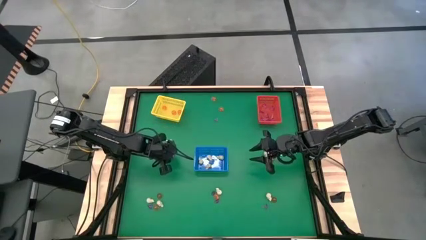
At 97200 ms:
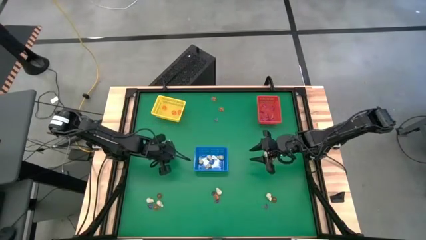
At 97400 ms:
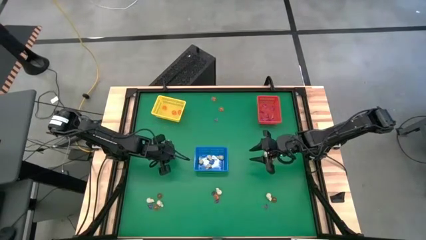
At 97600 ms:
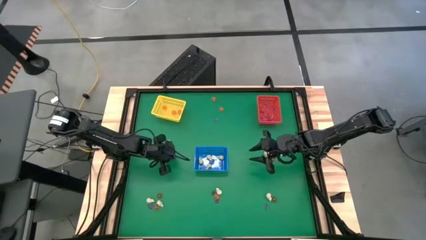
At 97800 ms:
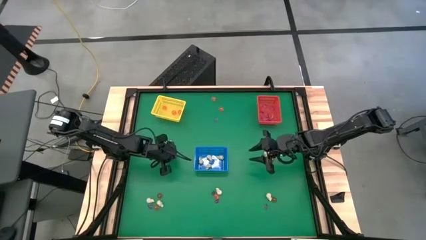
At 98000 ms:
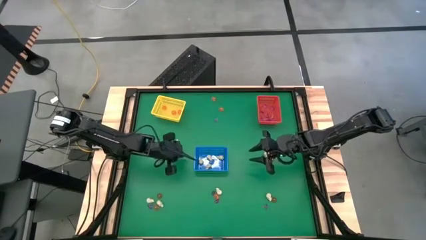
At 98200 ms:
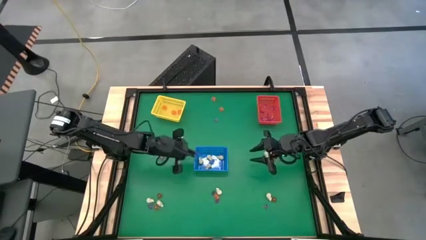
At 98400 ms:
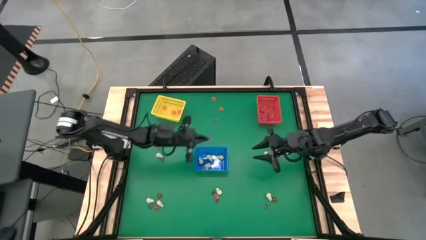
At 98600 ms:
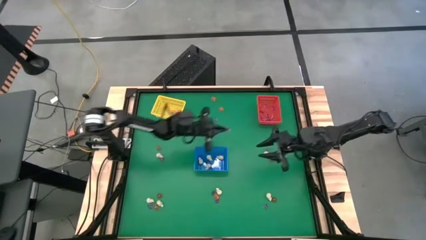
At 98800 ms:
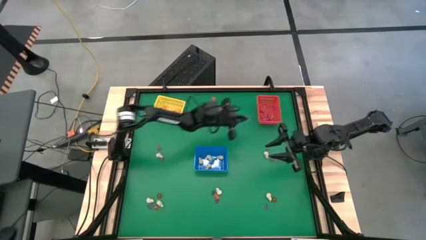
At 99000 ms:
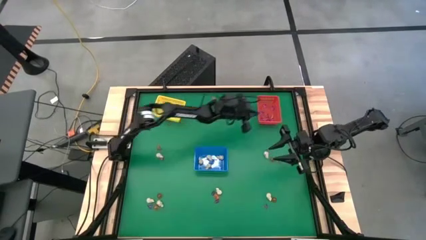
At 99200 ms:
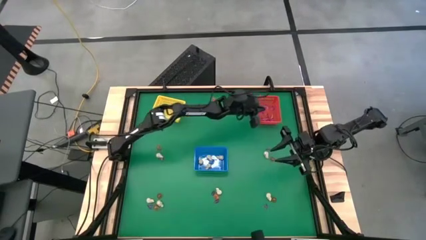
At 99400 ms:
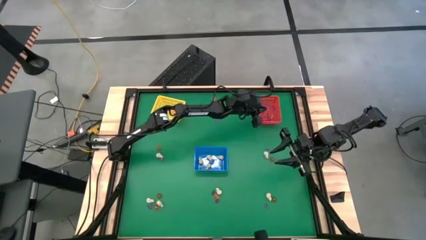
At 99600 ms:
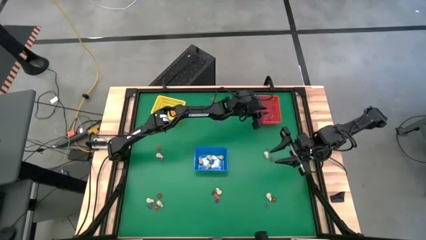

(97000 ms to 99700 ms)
Task: Sort Halloween decoration
Put the purple witch hat toy into the red bin

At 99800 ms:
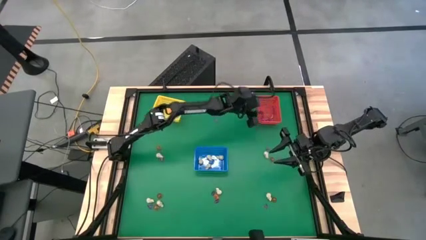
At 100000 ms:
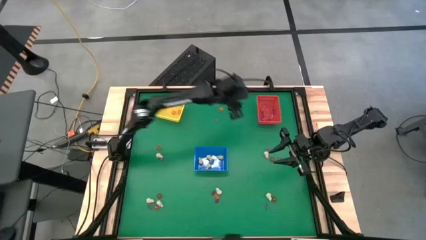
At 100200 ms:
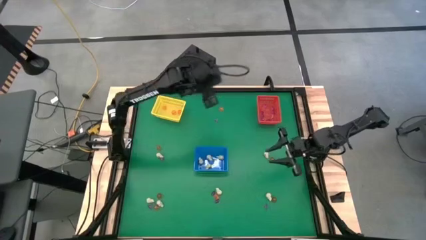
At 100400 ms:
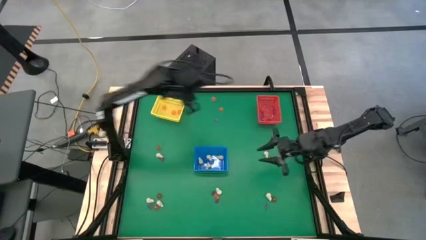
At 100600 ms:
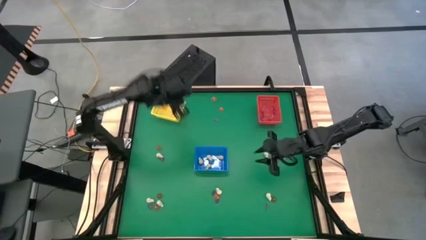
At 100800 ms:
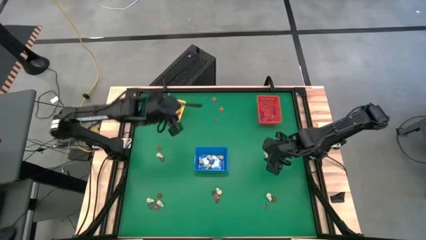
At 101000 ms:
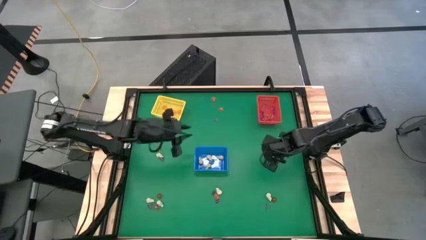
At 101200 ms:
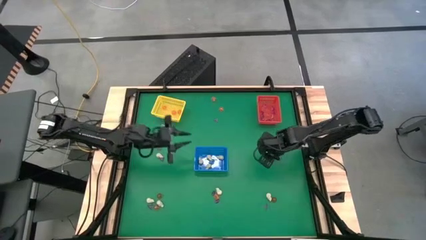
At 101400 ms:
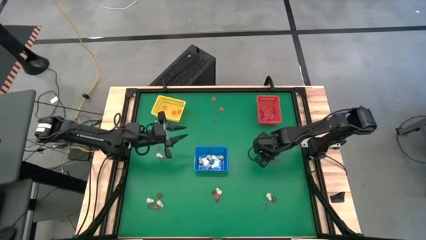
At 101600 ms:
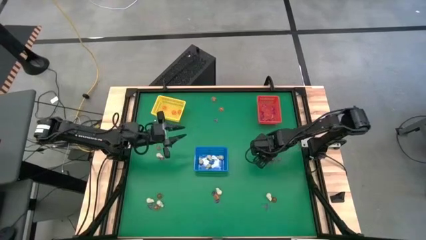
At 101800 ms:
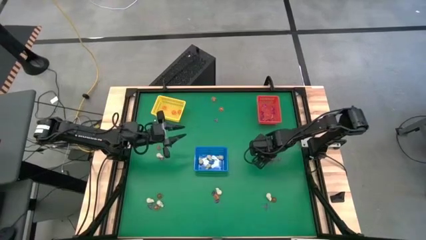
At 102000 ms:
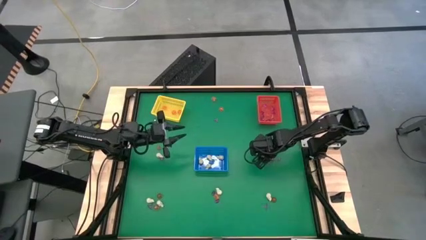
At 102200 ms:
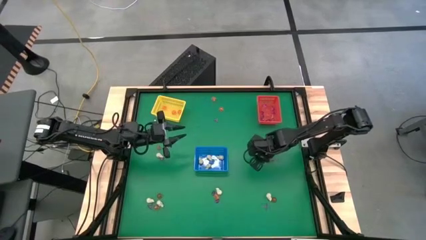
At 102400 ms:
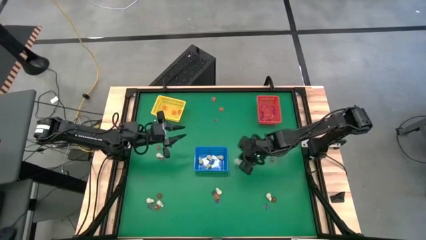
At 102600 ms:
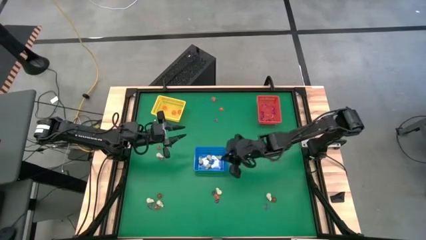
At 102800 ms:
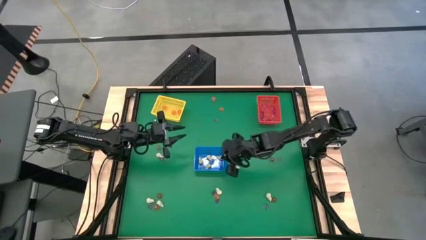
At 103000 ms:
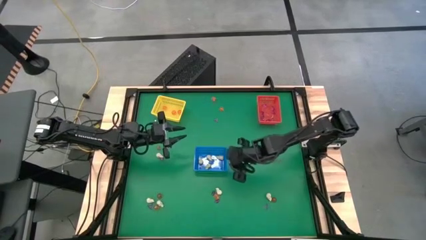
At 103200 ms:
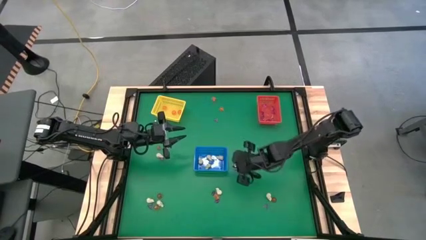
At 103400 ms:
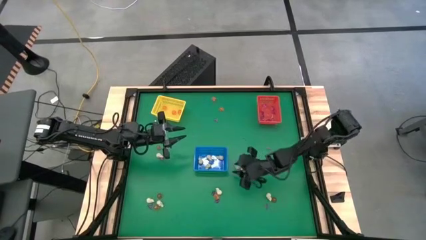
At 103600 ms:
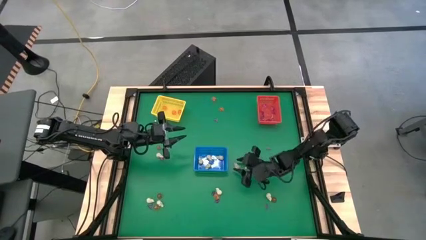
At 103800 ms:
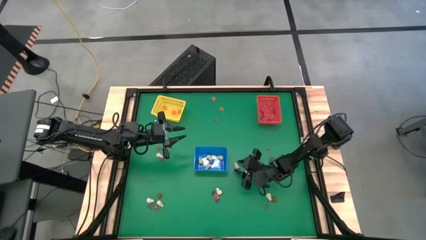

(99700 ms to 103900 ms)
Put the white skull toy into the blue bin

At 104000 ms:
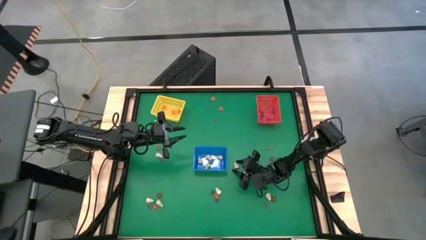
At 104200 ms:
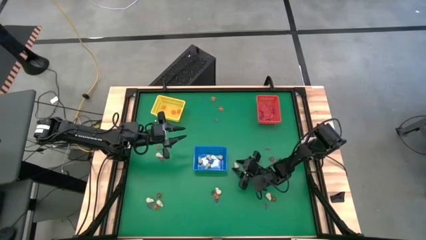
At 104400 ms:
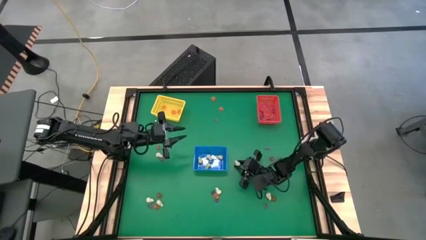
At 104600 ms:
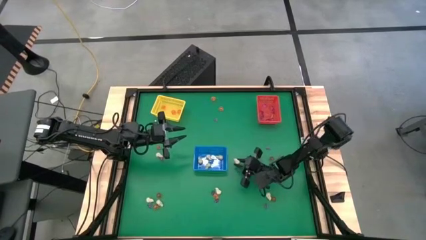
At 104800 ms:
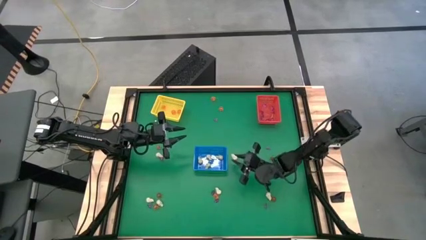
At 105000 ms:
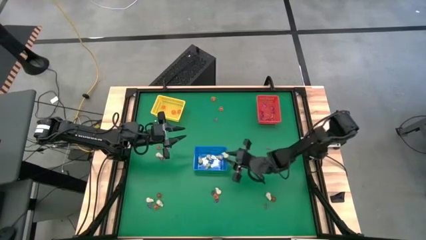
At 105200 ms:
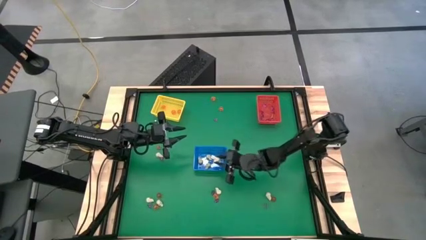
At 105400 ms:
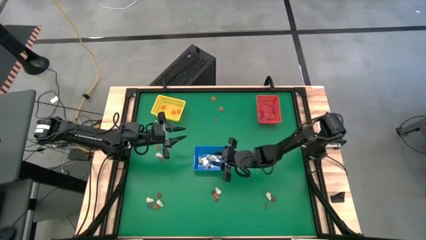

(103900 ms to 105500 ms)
Put the white skull toy into the blue bin

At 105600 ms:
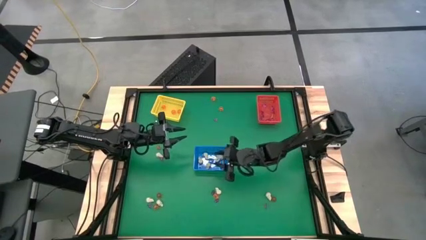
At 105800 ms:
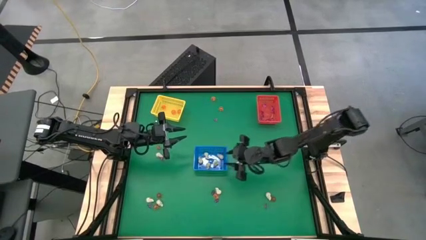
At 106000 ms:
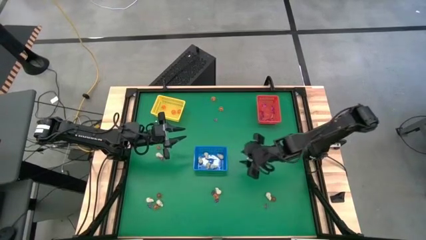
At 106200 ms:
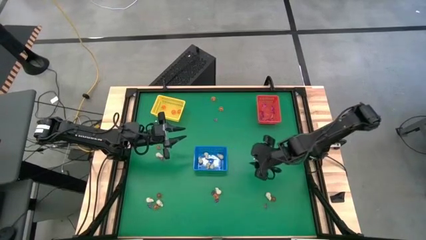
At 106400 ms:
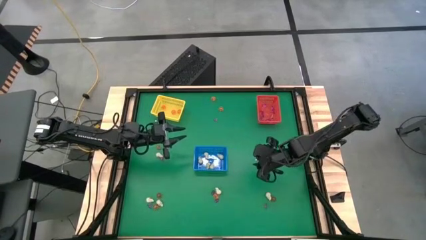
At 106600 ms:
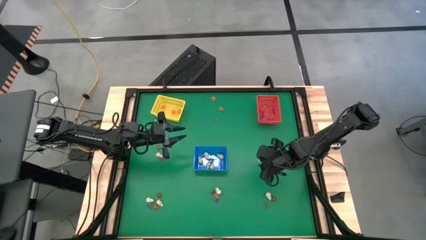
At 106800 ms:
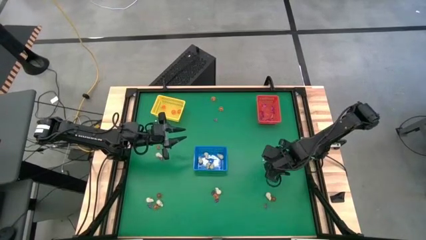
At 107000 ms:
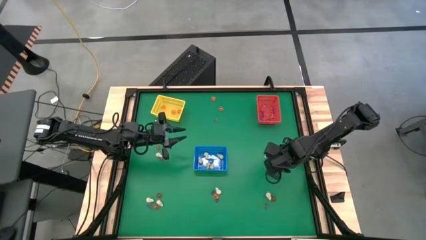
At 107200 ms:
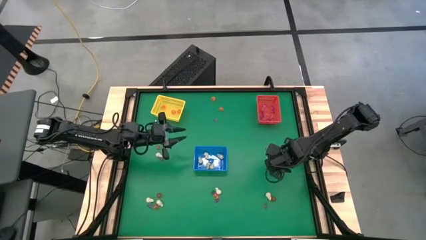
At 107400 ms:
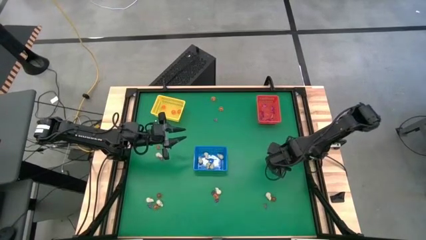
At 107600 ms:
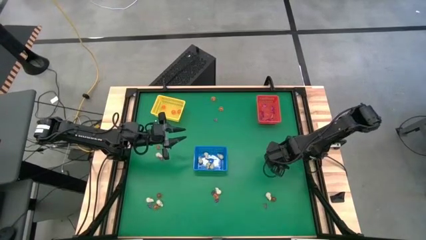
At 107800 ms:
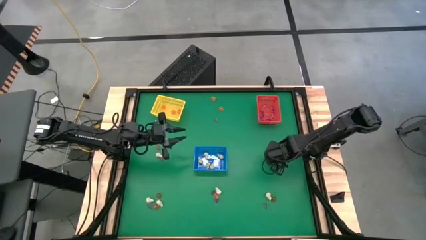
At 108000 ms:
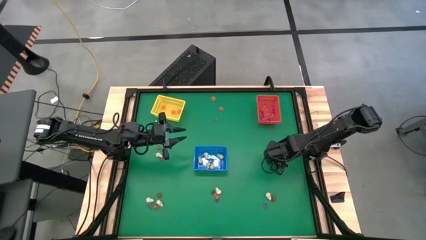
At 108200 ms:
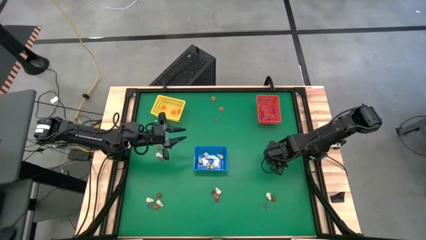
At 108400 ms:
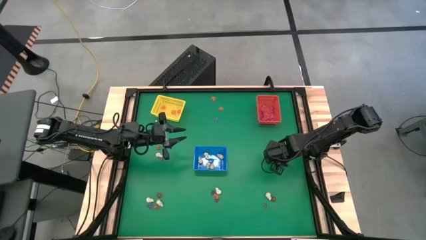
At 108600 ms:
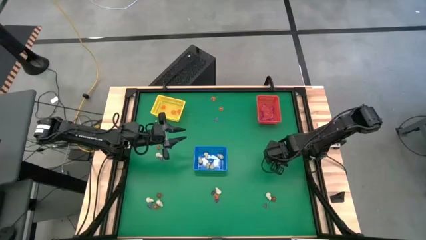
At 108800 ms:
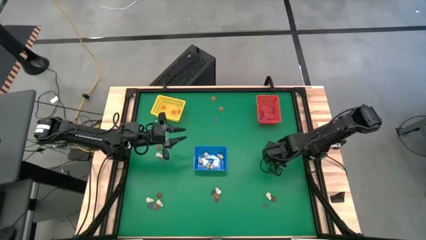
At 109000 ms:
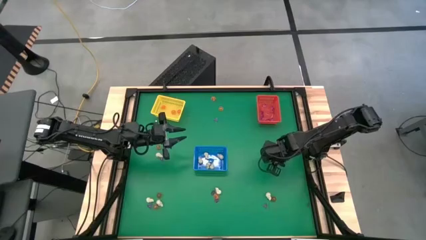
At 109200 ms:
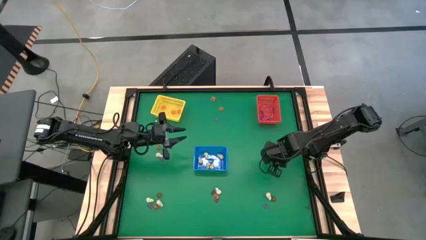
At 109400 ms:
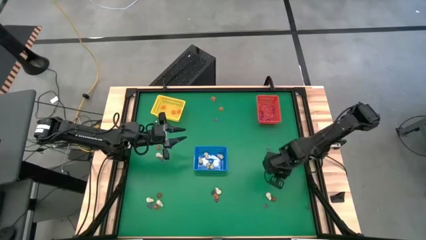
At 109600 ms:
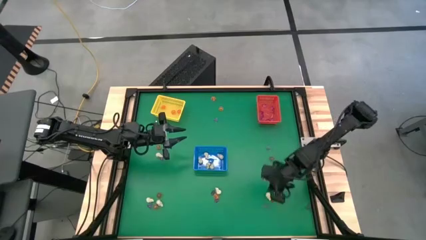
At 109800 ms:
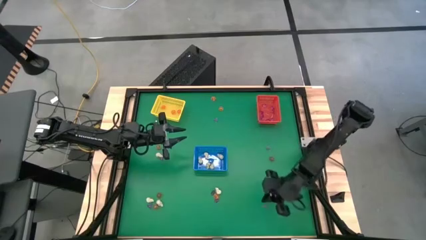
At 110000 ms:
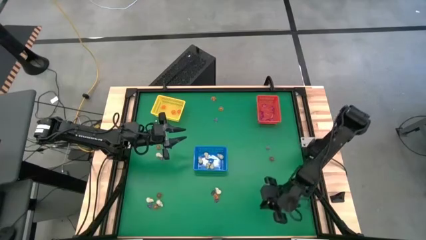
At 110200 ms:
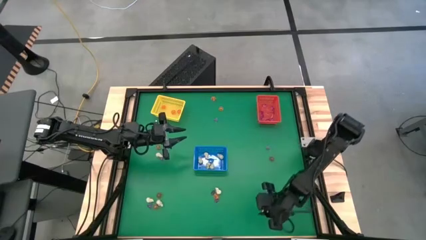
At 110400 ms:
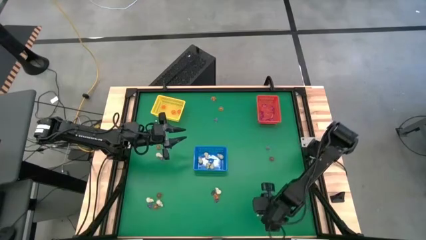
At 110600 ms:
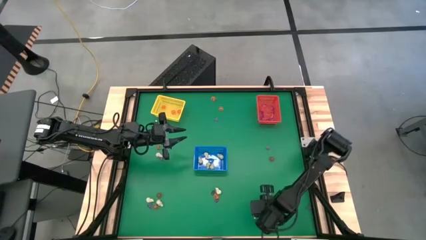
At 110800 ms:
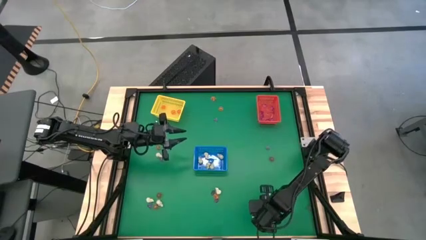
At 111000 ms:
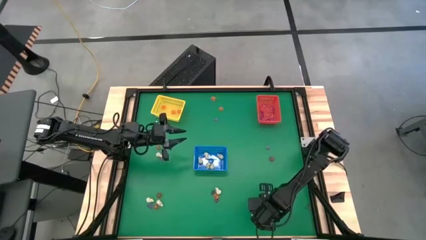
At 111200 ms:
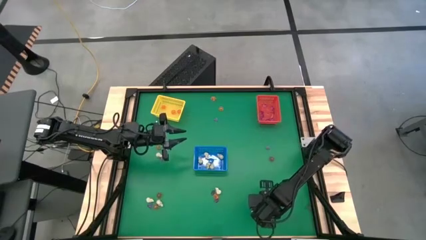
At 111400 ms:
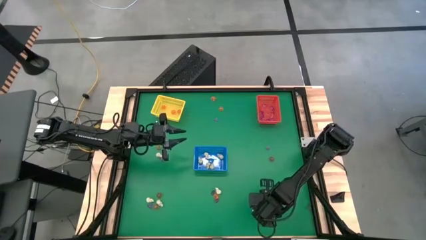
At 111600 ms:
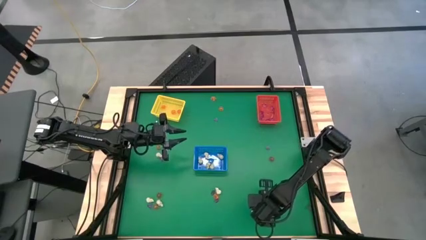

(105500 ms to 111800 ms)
Put the purple witch hat toy into the red bin

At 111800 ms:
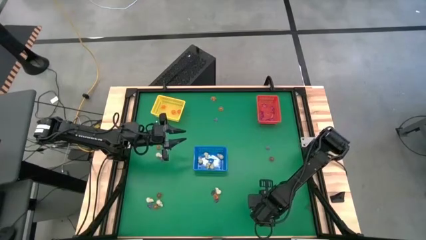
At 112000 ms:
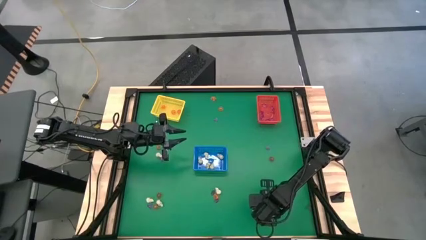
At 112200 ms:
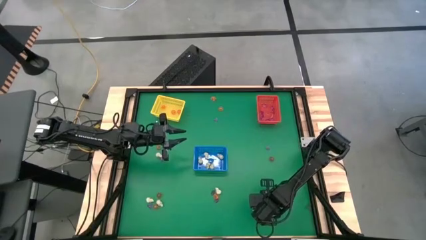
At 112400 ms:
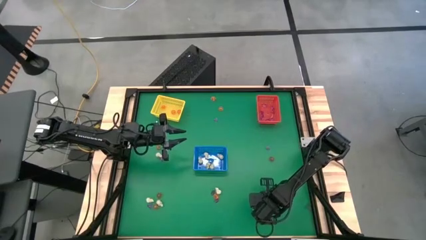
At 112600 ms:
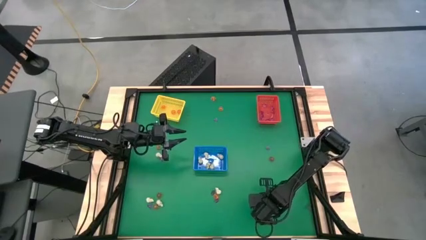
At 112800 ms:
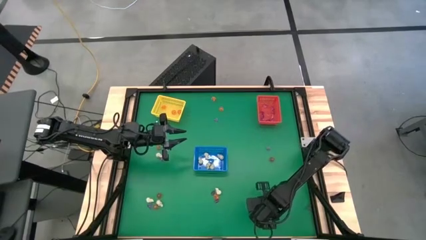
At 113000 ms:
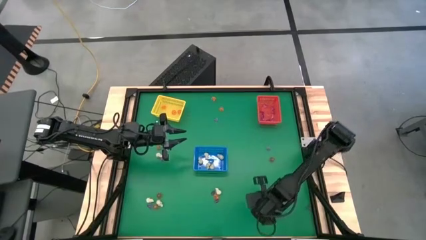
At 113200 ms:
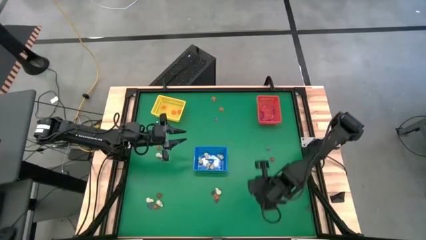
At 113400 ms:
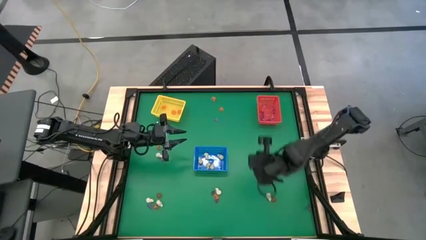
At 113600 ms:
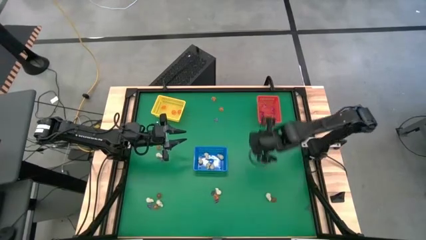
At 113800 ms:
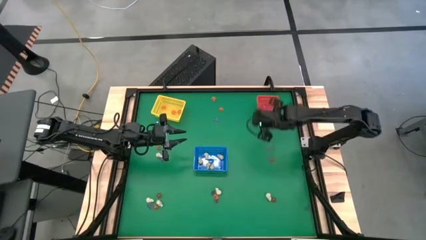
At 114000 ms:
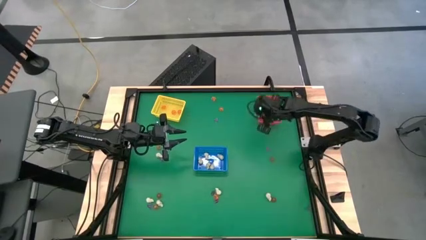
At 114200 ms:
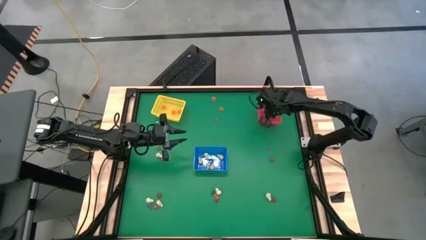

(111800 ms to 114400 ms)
Put the purple witch hat toy into the red bin
